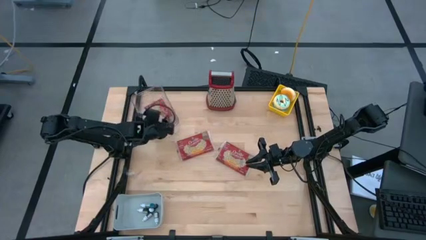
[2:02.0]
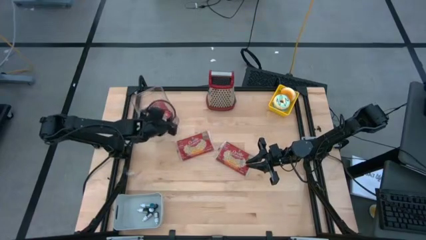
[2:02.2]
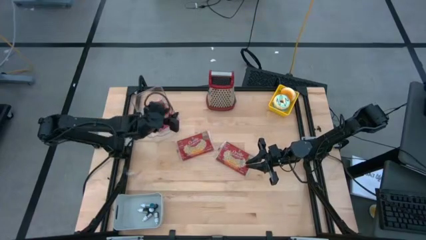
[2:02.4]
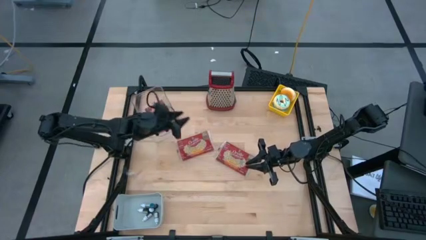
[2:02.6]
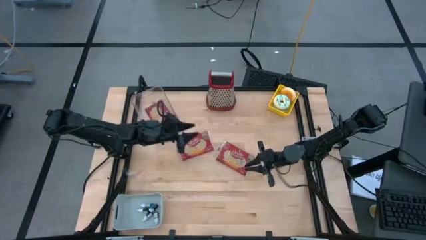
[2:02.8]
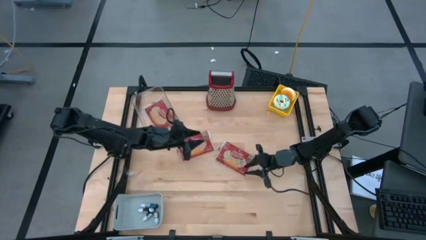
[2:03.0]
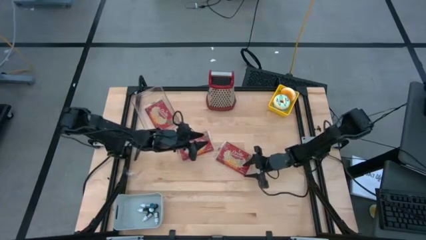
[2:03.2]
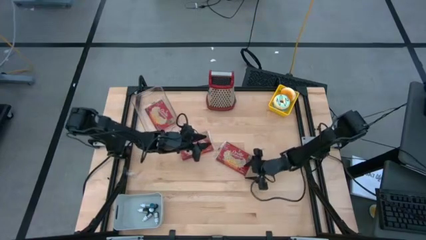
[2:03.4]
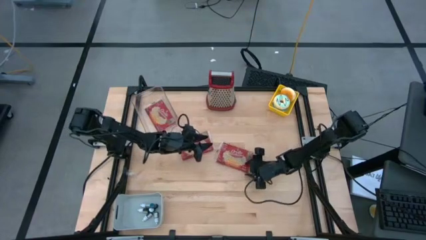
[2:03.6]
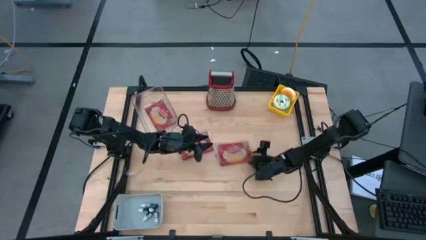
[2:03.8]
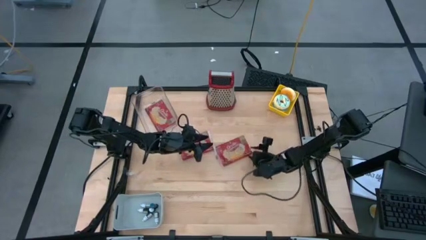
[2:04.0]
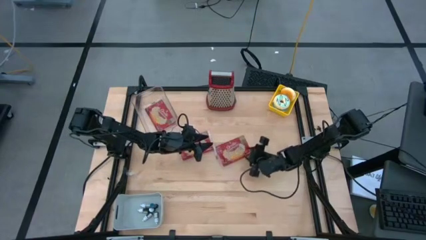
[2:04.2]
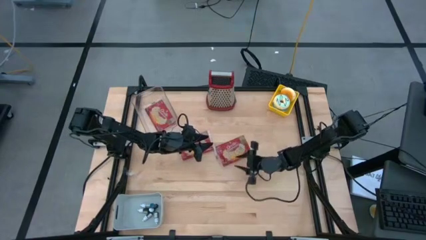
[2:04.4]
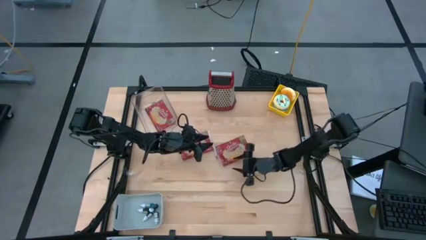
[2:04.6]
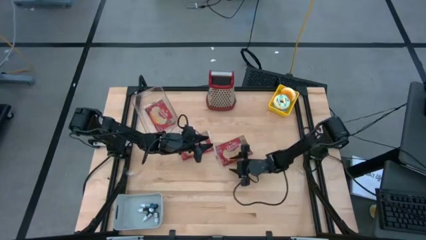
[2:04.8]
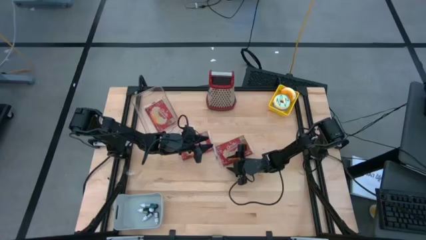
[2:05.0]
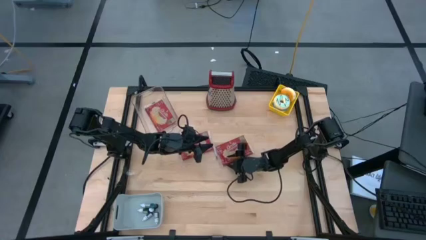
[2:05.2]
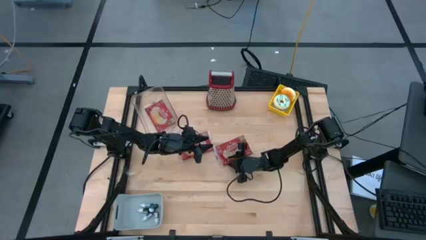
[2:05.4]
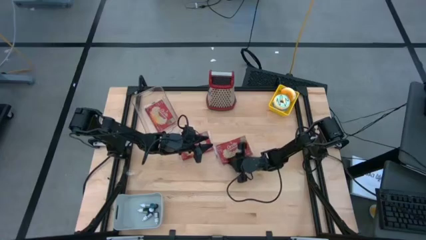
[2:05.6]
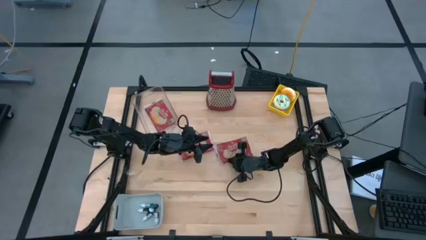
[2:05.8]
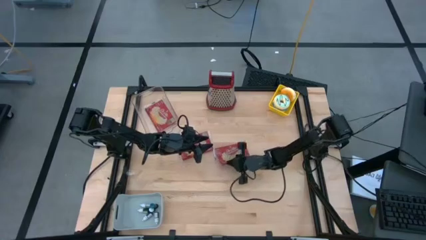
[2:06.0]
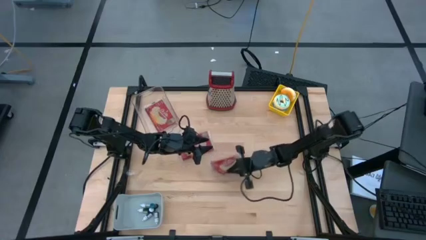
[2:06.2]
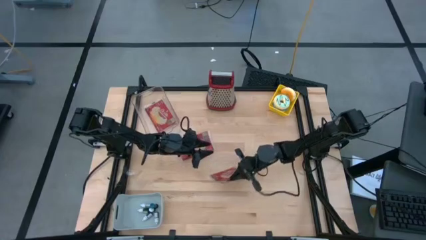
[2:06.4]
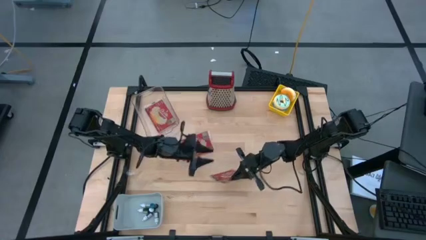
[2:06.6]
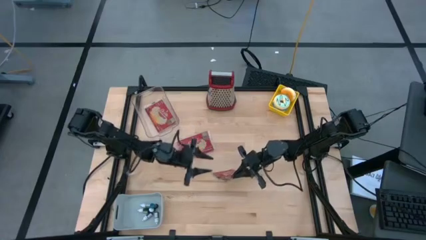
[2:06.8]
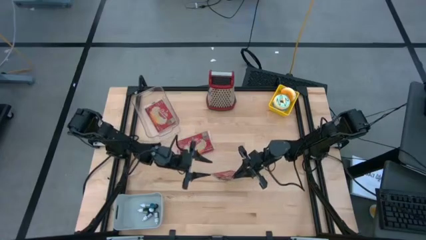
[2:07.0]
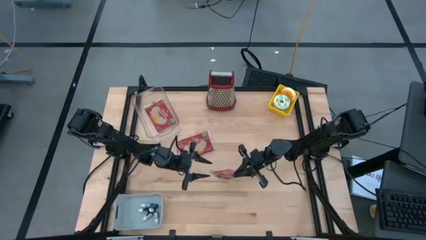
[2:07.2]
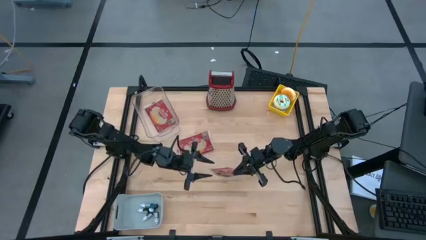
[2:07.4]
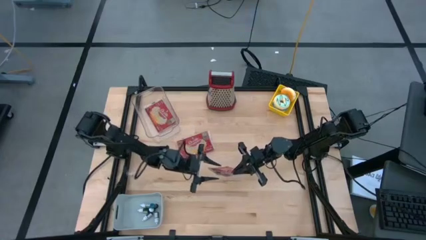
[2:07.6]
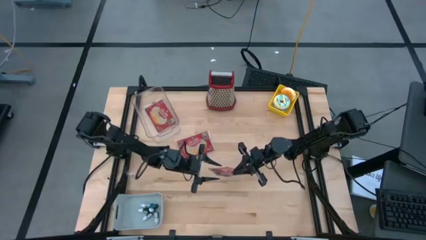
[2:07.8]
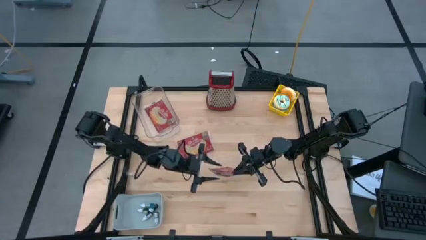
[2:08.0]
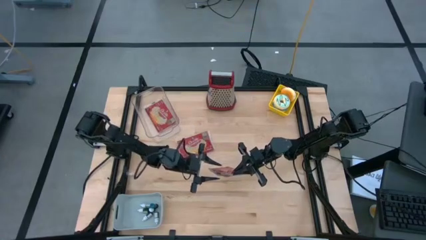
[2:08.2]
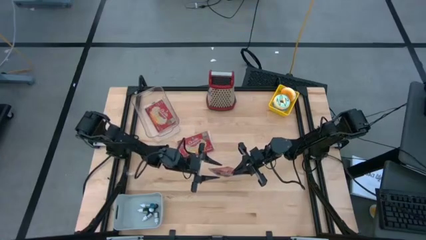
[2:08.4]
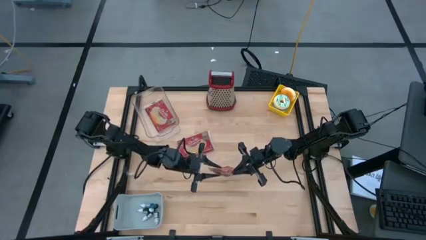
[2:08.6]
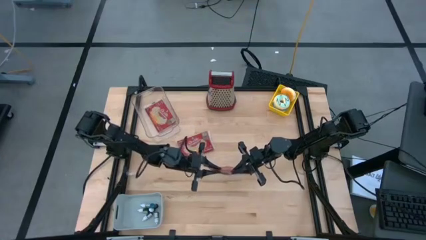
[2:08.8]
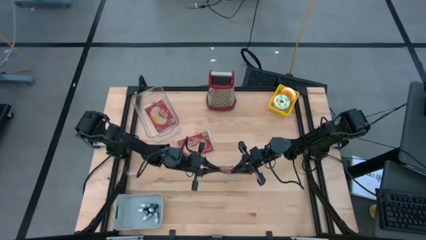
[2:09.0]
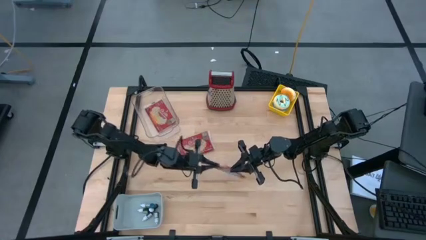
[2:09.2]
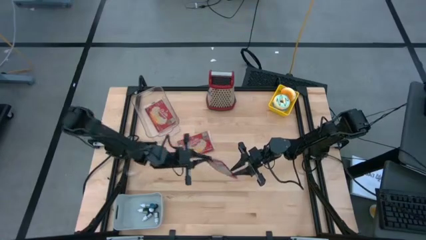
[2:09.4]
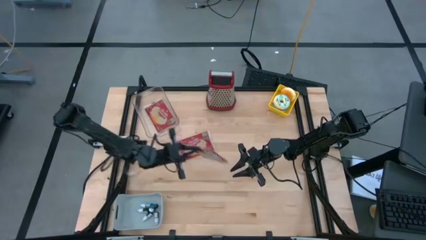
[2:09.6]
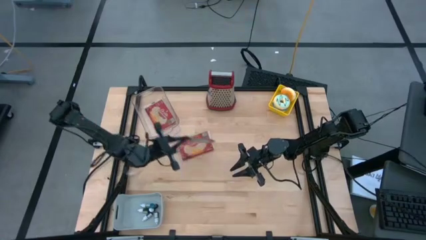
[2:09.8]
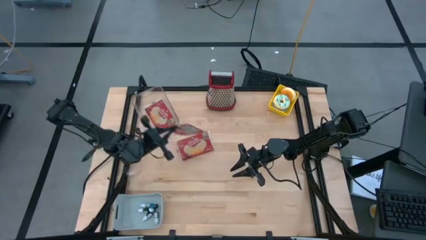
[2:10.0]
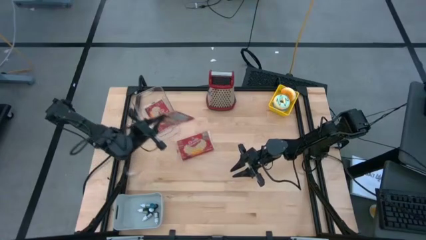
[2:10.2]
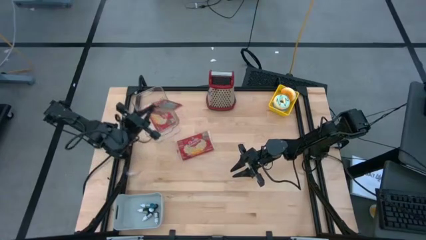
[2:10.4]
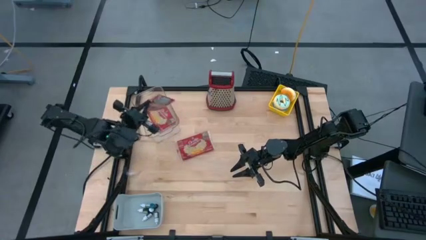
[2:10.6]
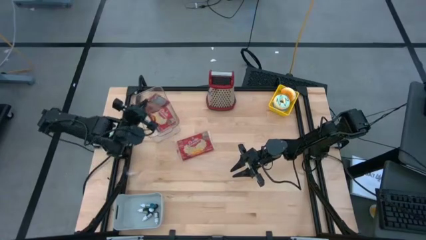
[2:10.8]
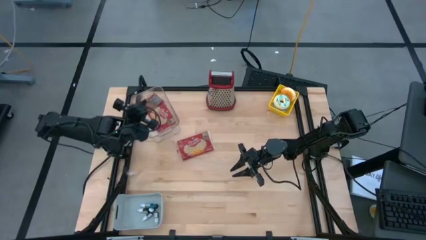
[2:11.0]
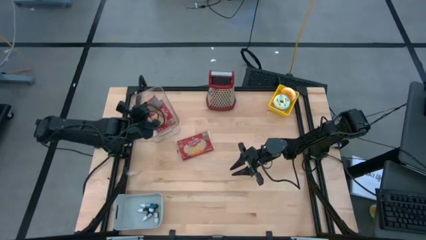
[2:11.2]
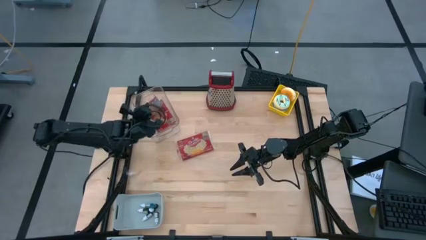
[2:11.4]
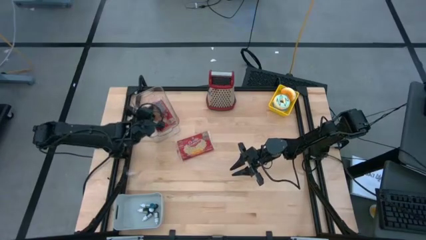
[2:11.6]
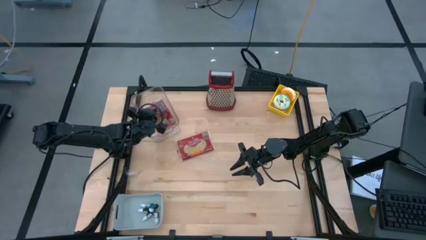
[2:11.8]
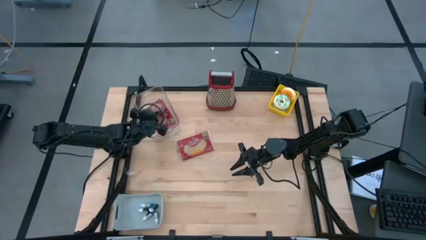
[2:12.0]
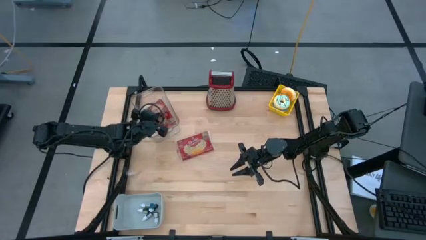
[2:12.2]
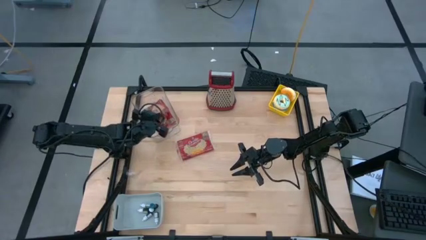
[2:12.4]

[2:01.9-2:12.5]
Put the right red popcorn bag into the transparent bin
